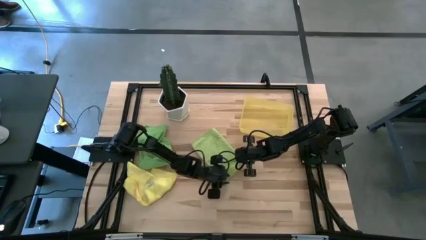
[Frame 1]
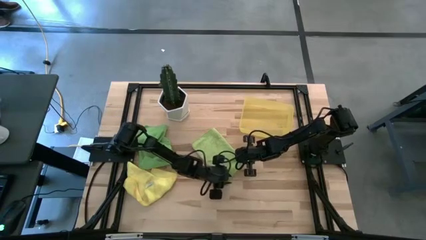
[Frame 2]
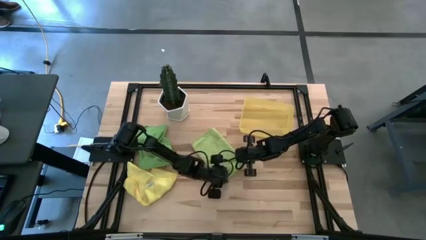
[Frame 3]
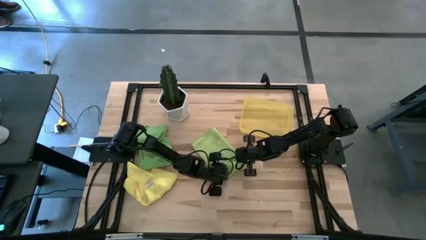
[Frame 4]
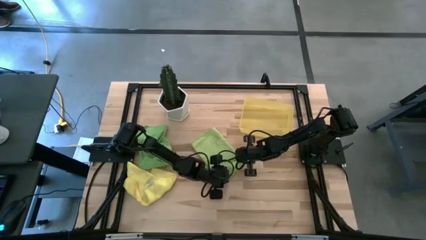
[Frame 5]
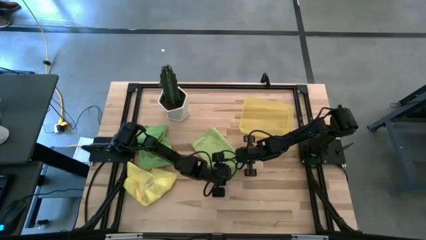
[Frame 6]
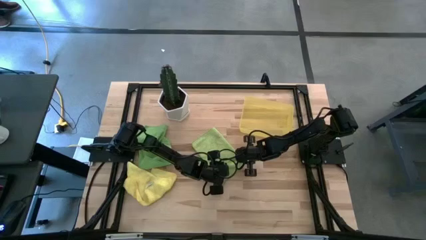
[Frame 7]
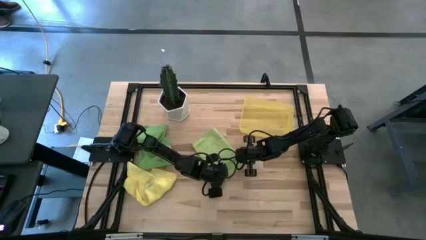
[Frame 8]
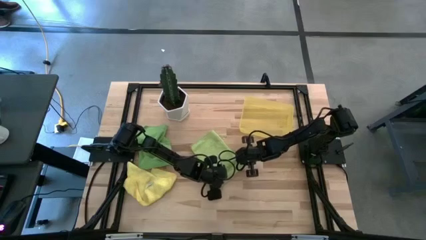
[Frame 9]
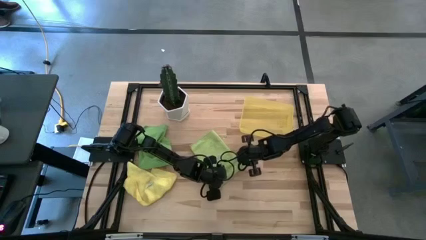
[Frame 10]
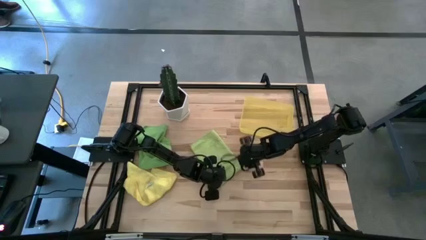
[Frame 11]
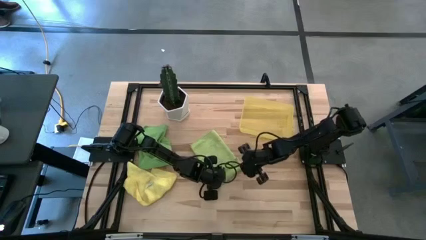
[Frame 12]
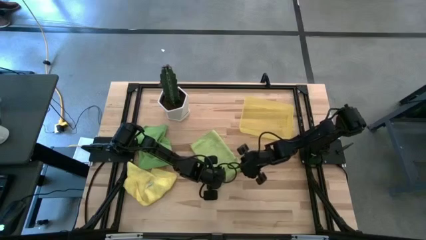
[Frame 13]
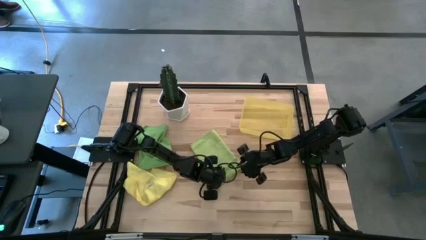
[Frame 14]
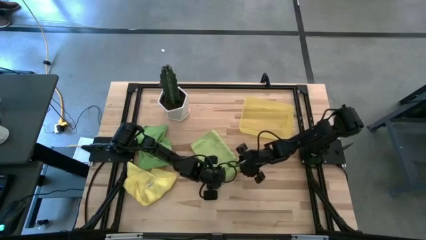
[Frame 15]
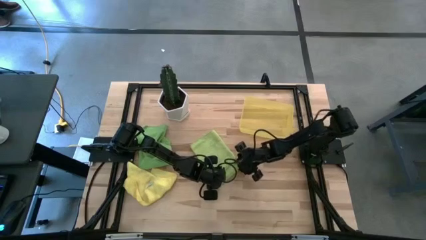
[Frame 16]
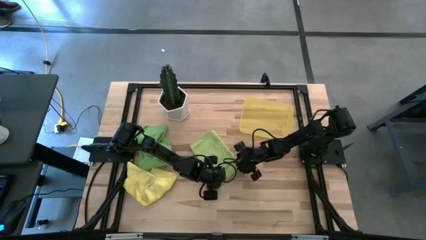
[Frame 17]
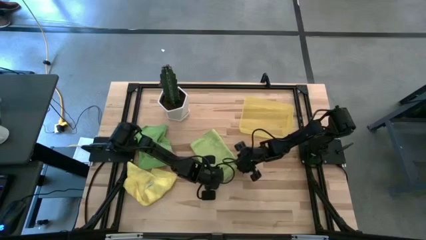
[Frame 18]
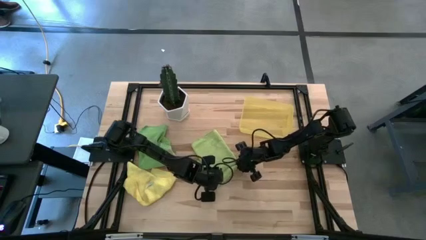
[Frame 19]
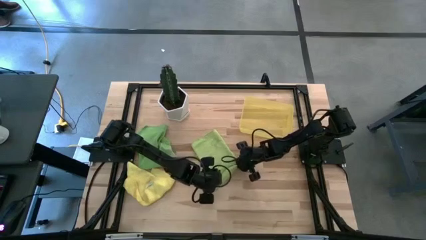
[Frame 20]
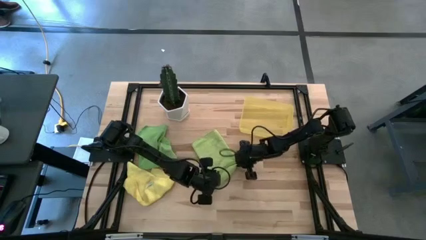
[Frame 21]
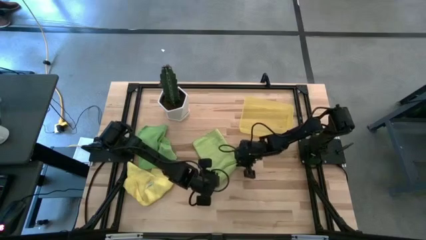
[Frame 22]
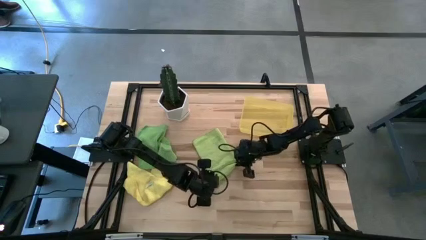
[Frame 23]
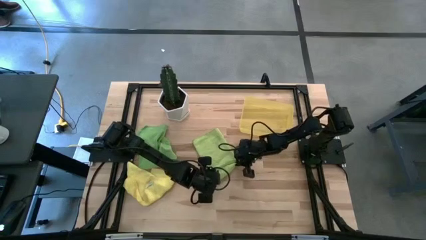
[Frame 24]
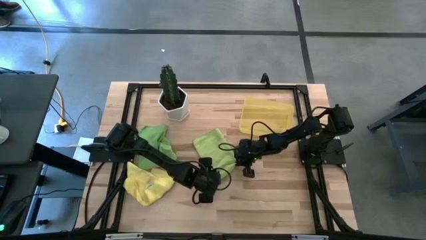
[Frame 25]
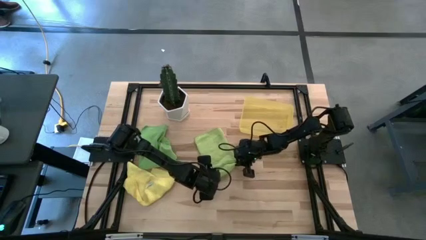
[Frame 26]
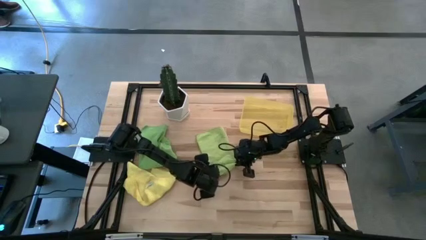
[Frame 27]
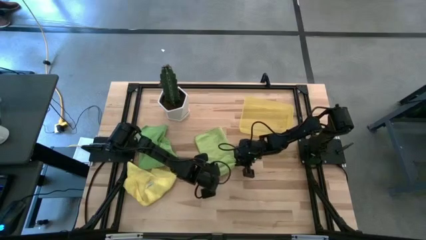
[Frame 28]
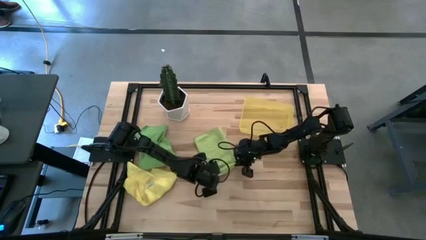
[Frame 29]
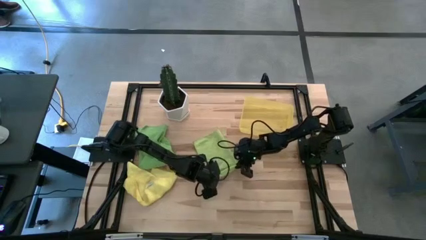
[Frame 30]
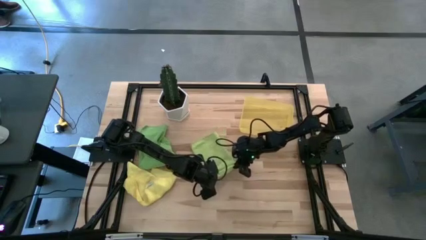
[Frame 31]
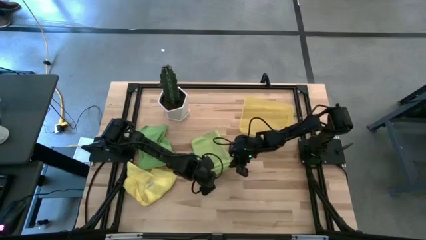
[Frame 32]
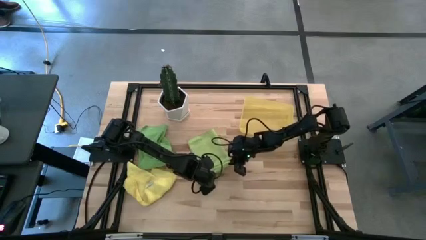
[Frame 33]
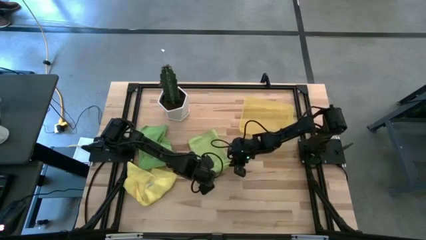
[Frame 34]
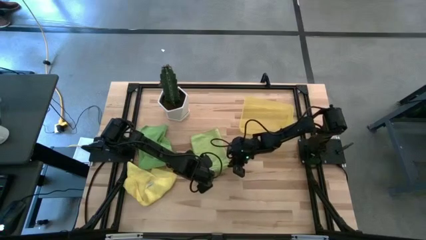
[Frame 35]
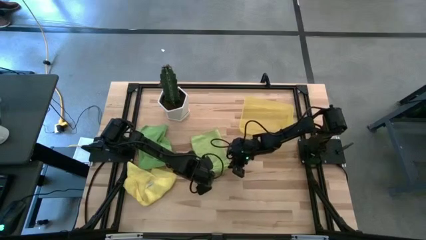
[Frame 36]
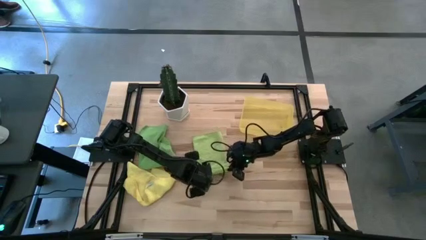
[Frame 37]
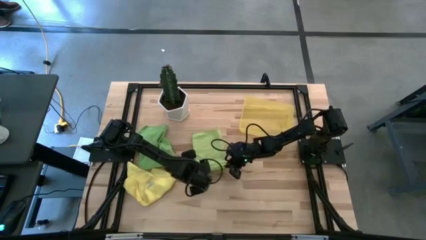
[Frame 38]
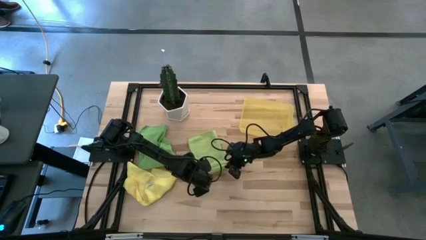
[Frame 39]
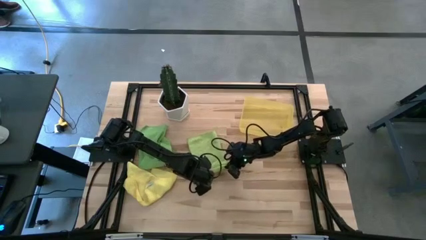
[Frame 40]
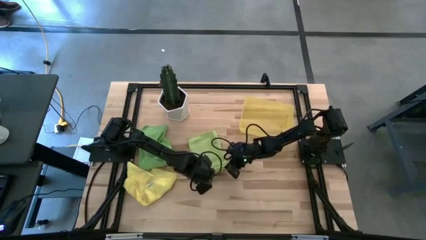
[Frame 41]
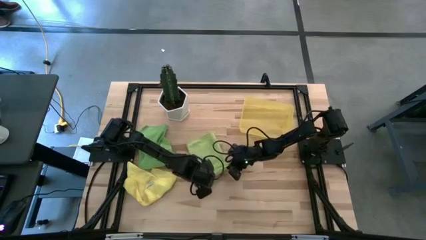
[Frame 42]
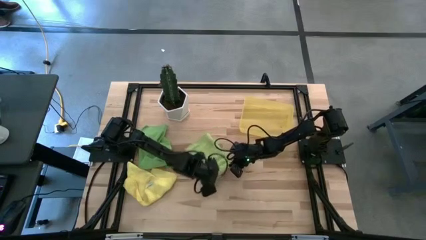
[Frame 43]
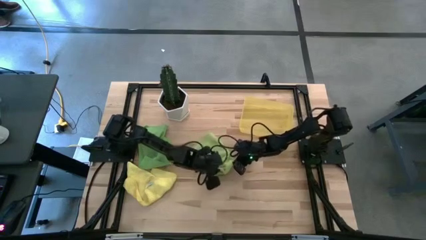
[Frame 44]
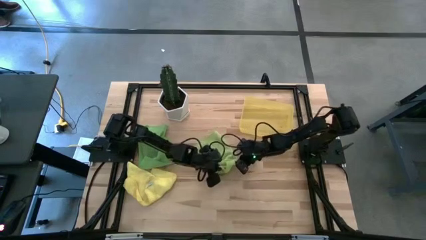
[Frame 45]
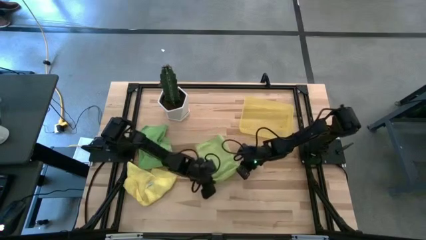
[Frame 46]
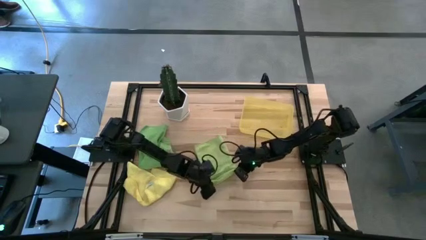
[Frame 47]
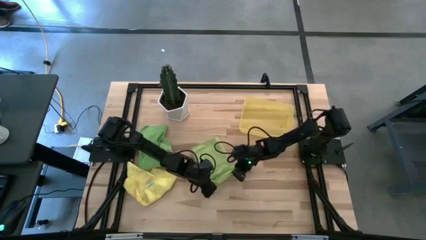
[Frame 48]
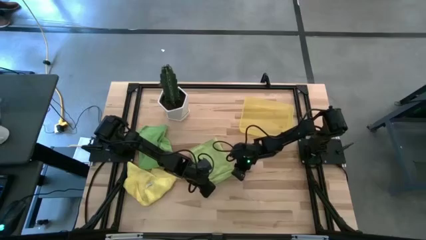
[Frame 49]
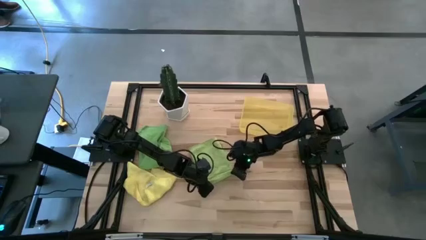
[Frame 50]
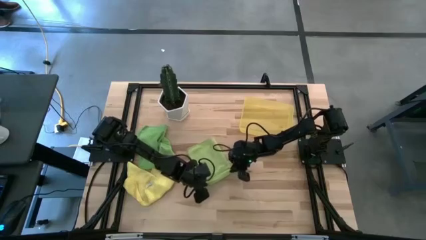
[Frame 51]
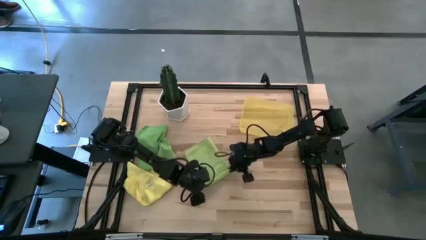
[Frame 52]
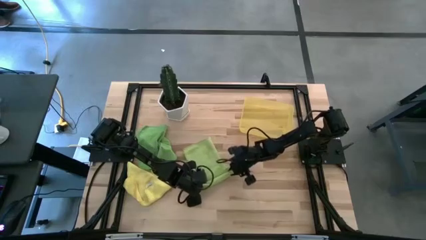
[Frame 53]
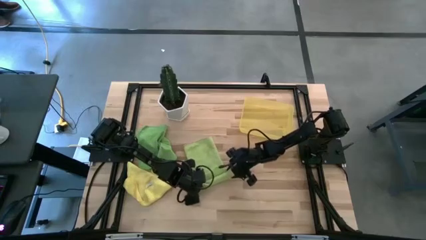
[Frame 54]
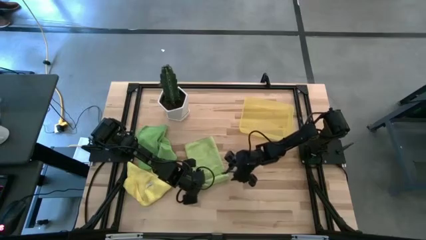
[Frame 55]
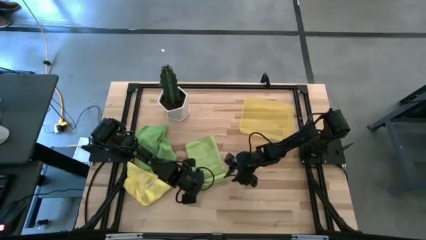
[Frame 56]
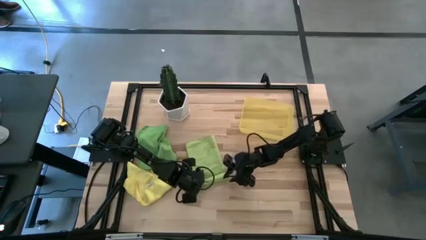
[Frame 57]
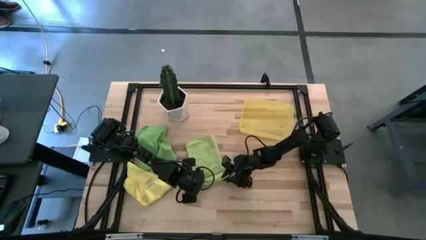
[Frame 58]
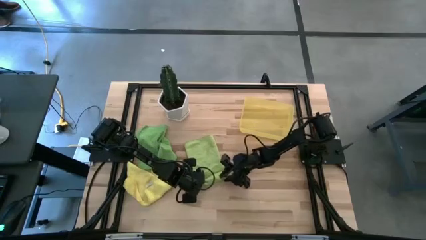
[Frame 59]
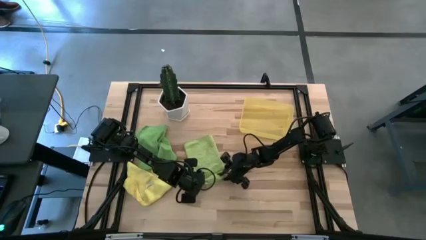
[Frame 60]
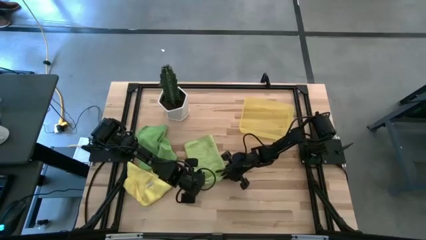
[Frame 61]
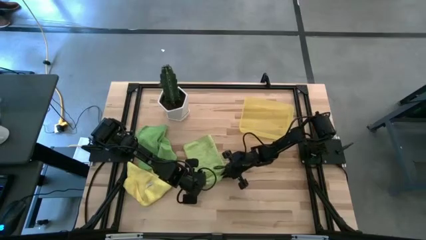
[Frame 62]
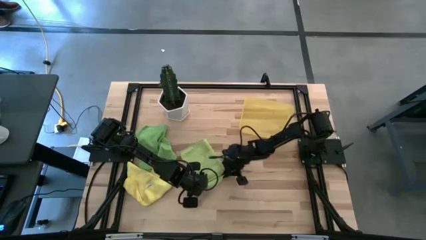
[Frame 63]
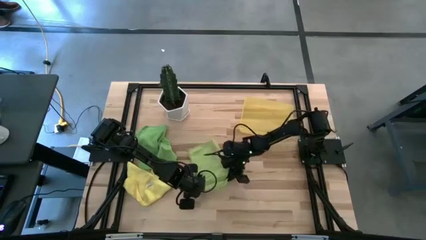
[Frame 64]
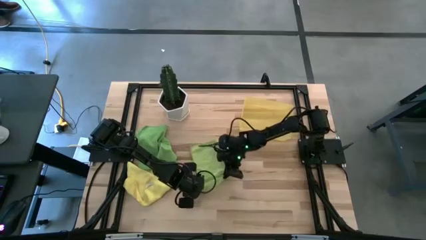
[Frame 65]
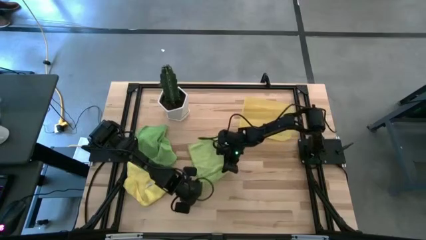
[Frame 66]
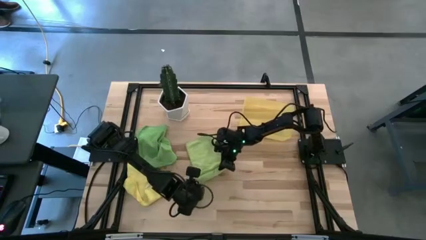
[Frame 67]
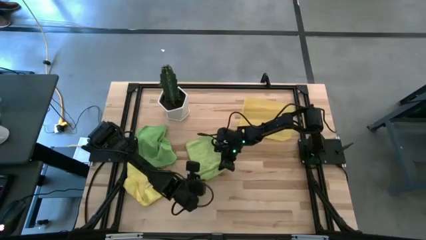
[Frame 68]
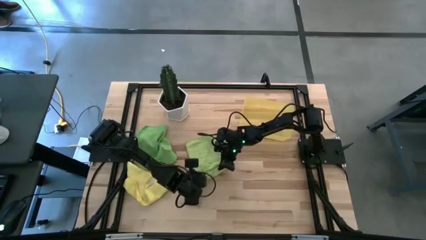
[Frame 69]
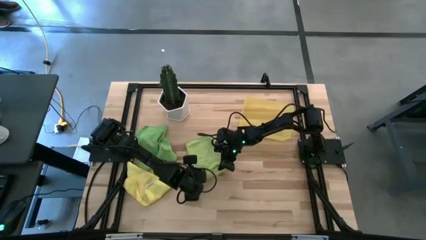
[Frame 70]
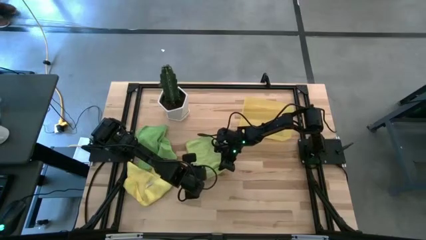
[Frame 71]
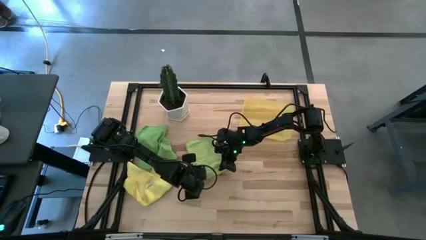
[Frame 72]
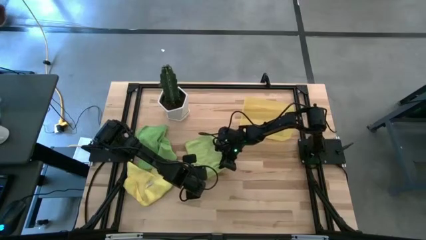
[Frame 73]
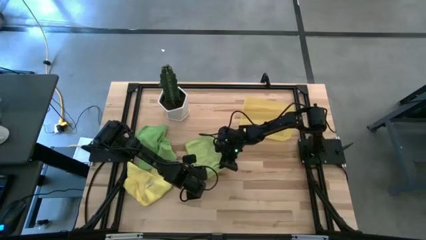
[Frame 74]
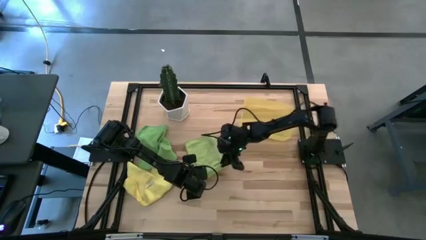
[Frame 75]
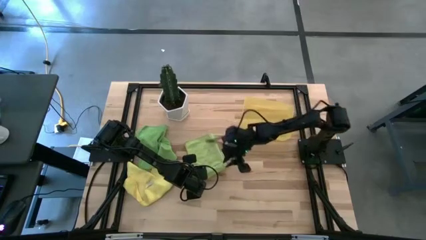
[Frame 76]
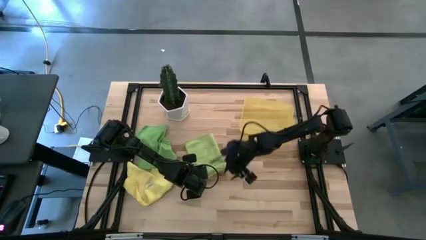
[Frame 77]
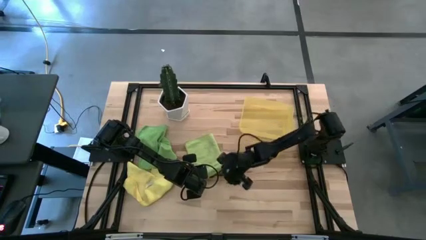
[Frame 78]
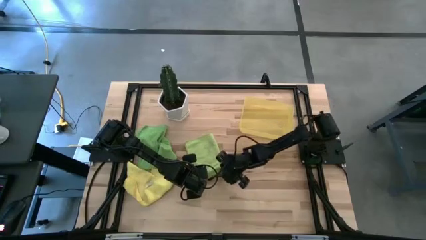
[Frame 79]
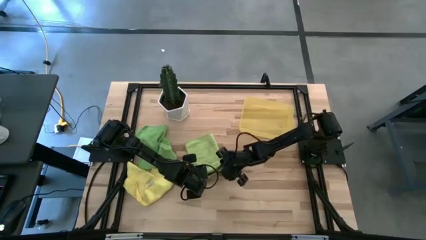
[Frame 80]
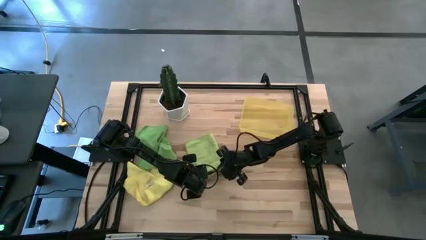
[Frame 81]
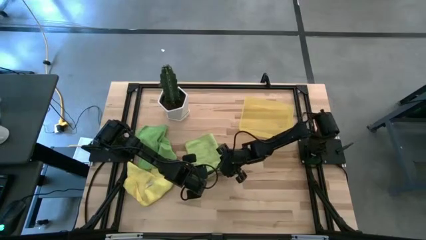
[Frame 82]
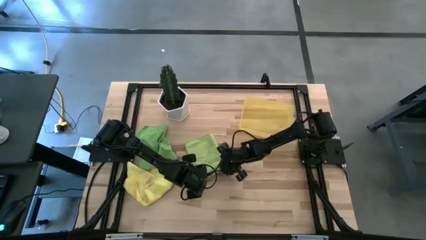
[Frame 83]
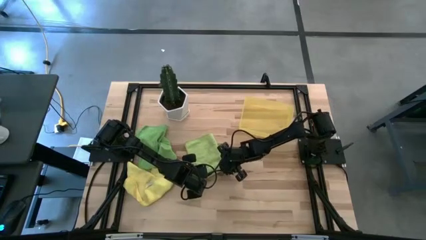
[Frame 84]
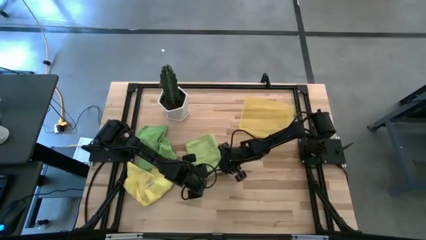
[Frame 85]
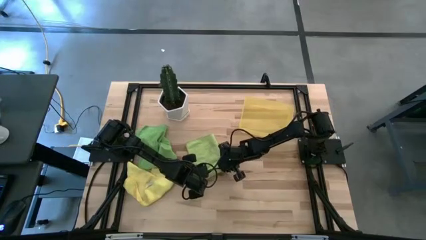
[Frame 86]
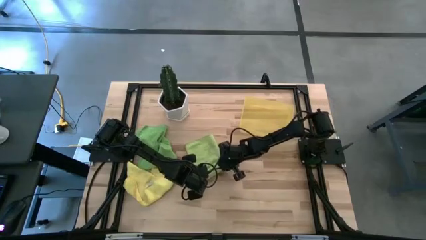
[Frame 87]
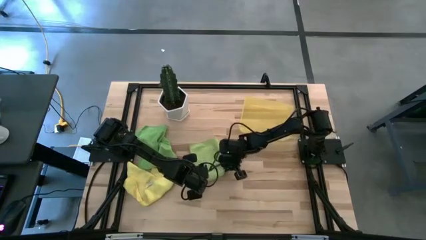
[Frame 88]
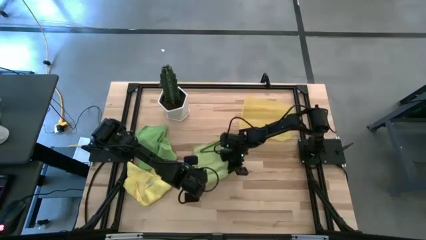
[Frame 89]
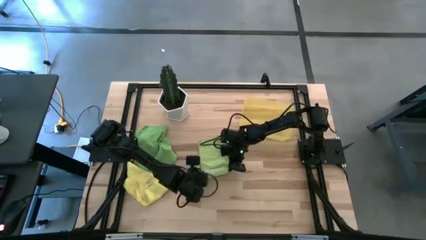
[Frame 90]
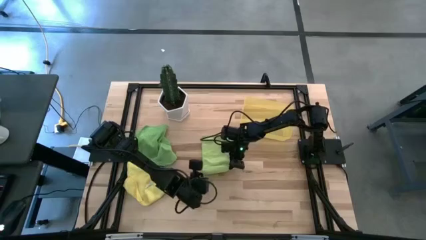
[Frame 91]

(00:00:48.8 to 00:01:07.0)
Task: Roll microfiber towels into tight, uniform cylinder then place into a basket
Roll the light green microfiber cloth
